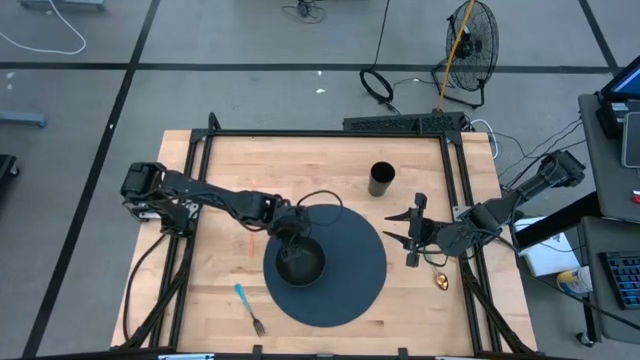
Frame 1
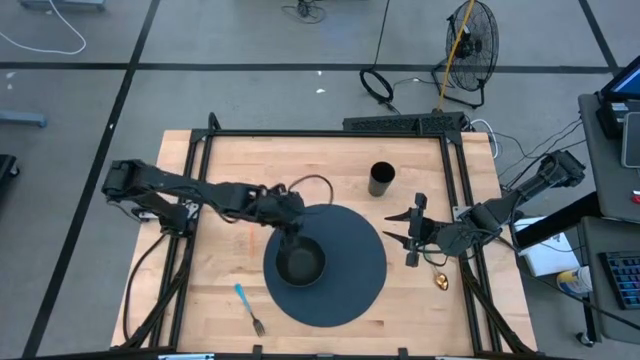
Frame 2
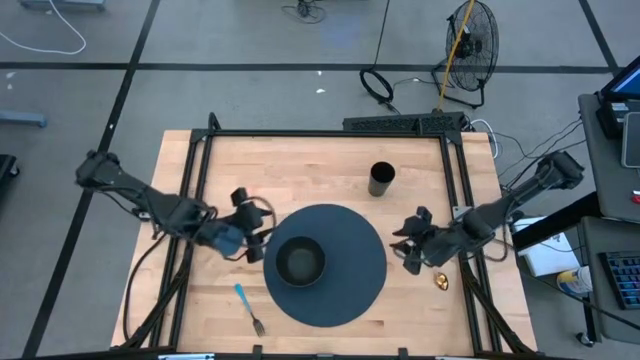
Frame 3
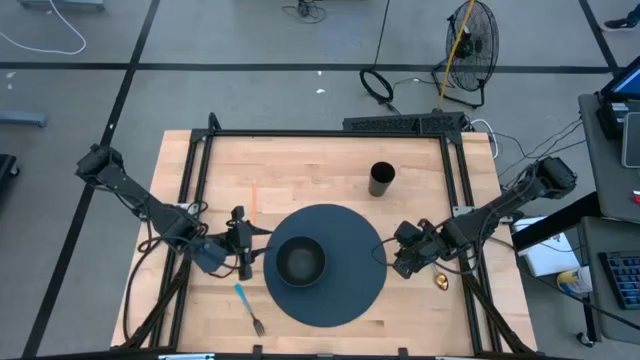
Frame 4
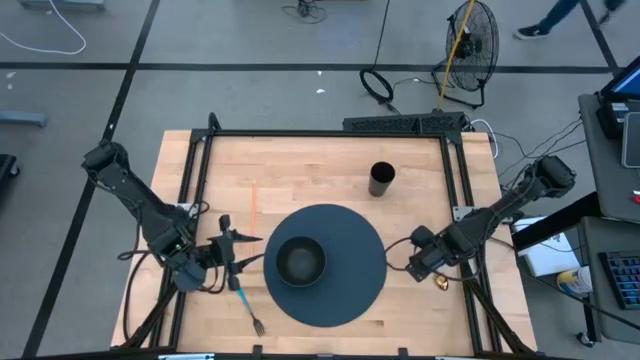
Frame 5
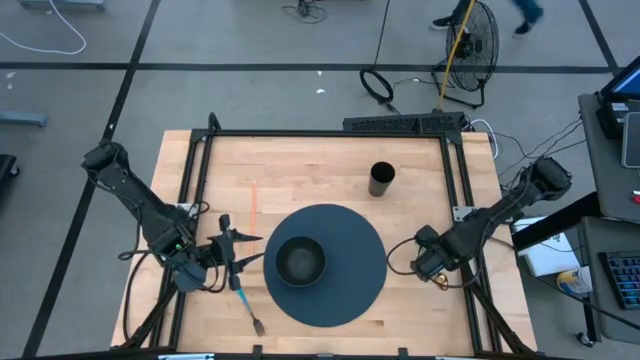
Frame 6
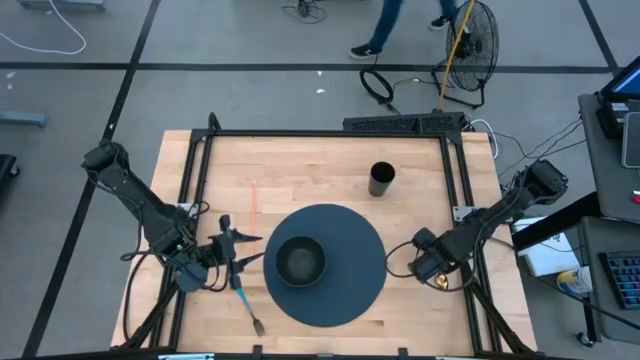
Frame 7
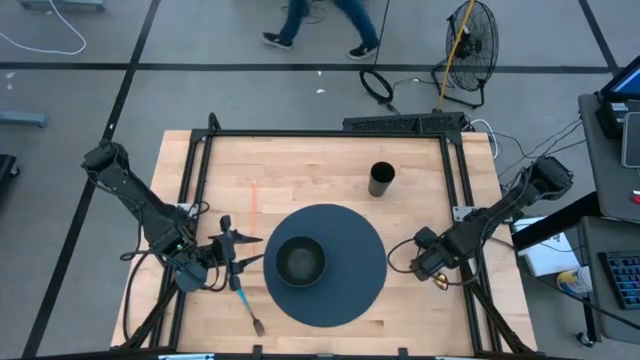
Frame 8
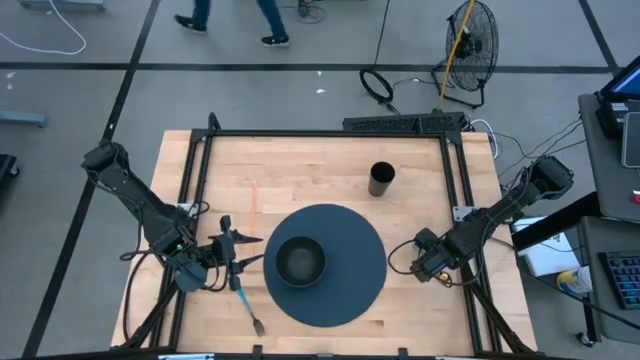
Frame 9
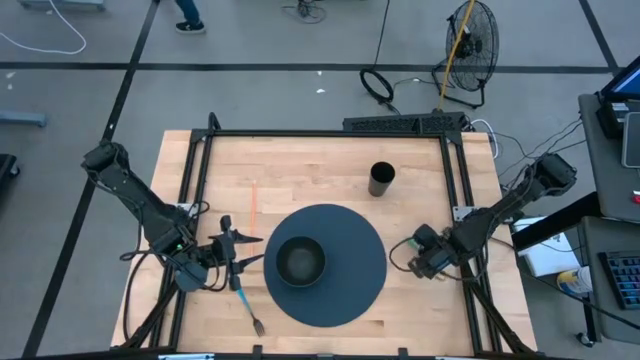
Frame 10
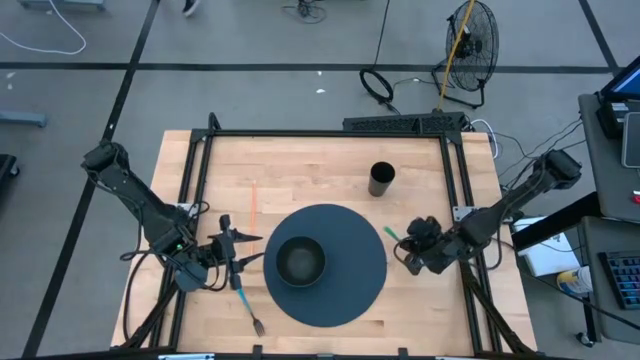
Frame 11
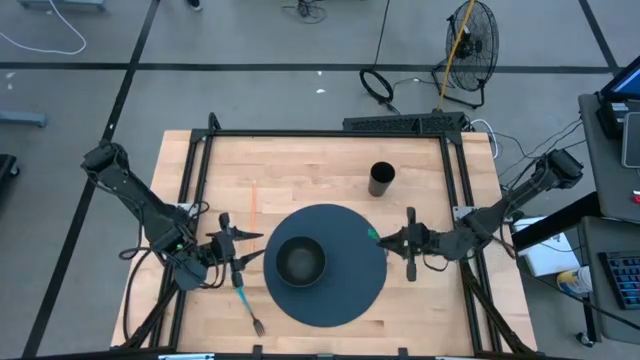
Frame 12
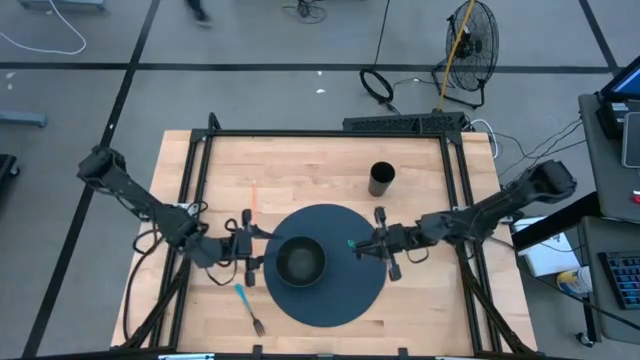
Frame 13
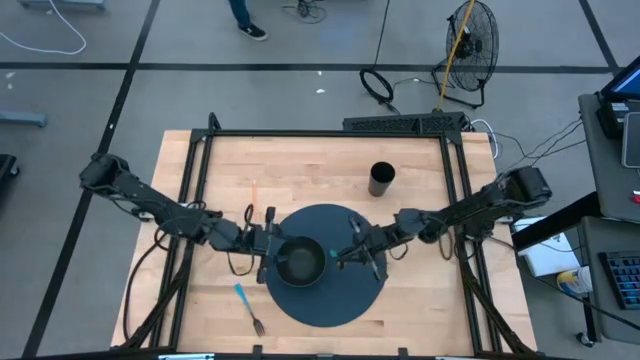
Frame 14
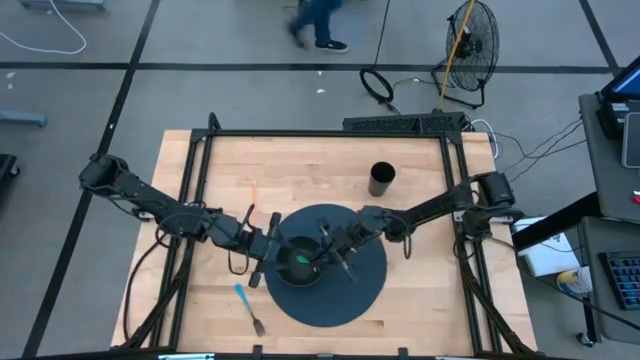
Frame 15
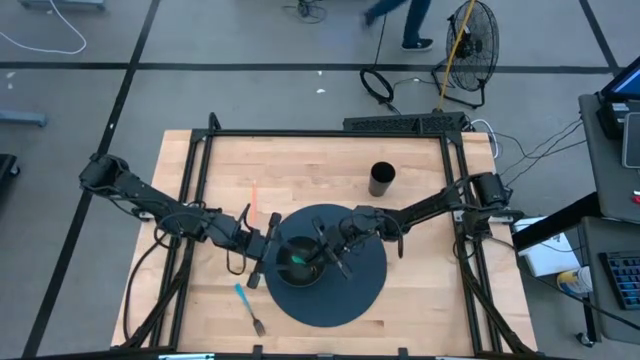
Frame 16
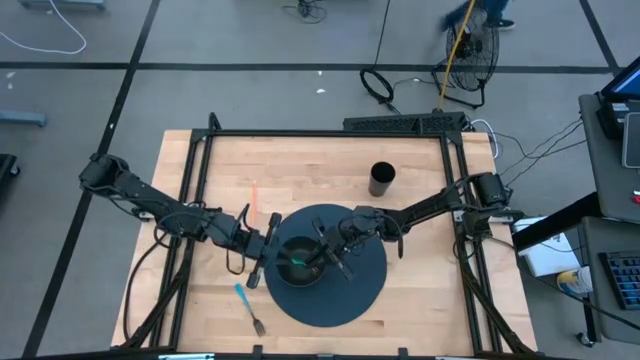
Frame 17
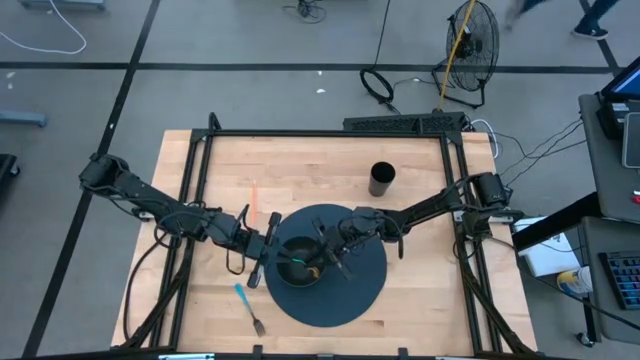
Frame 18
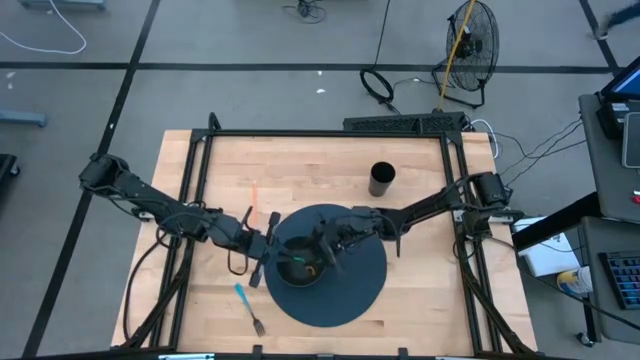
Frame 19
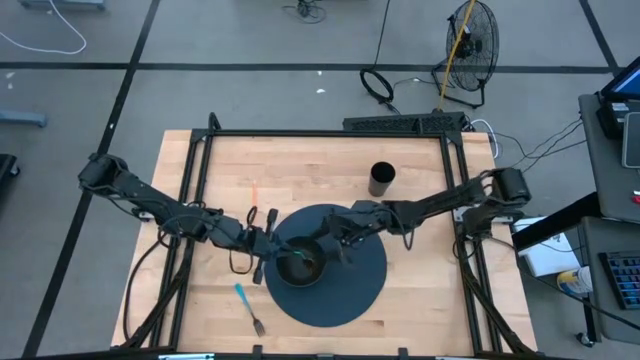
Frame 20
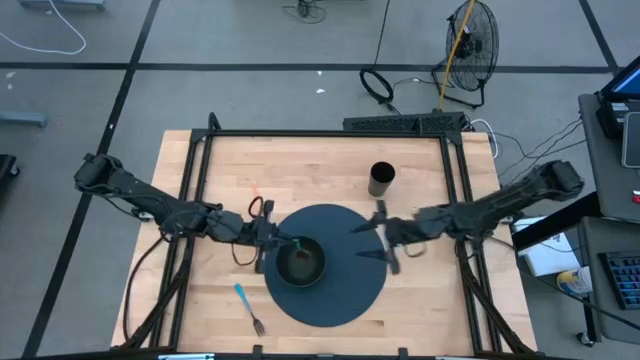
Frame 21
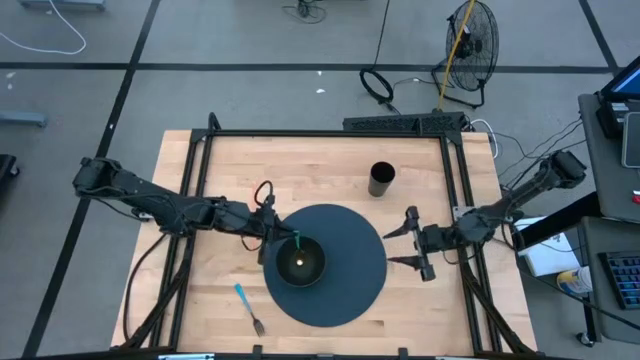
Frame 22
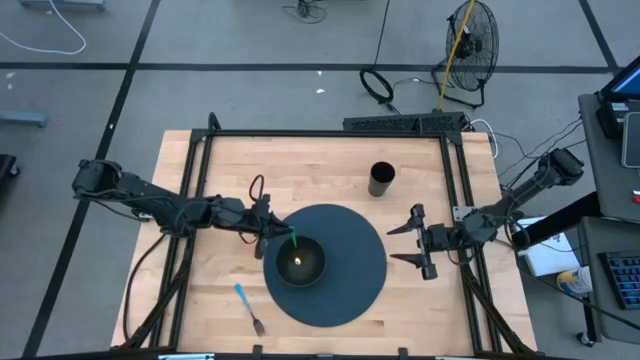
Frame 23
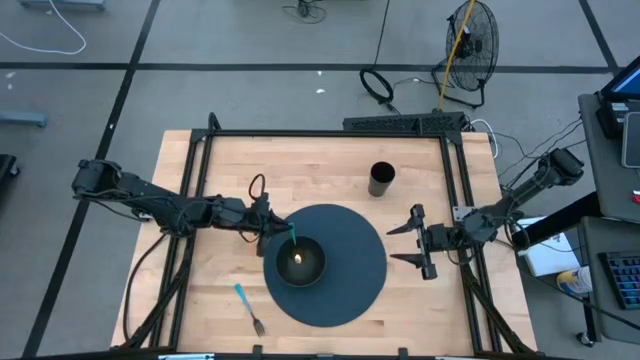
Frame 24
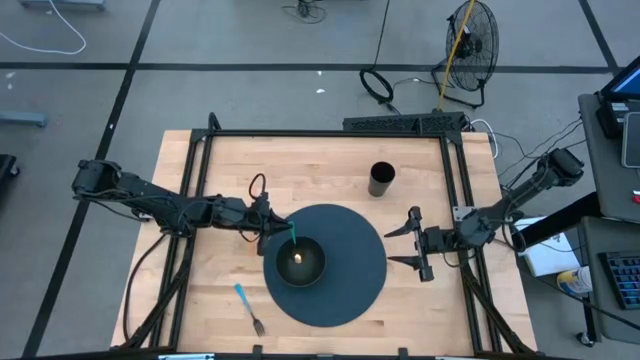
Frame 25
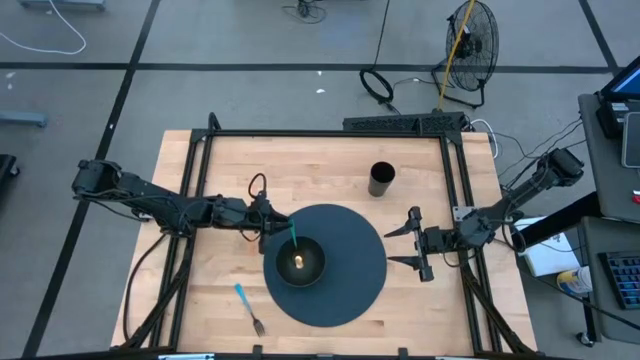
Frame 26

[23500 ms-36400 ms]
Task: Pick & Place Utensil
Put the green spoon into the black bowl
